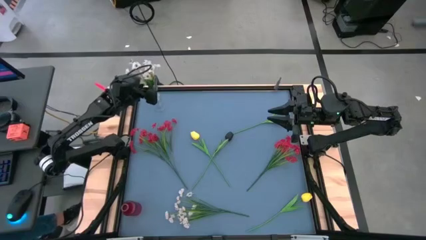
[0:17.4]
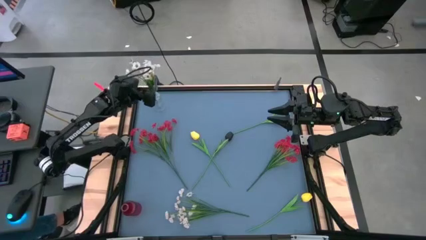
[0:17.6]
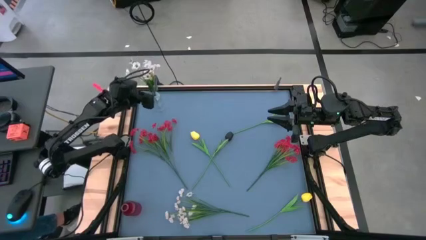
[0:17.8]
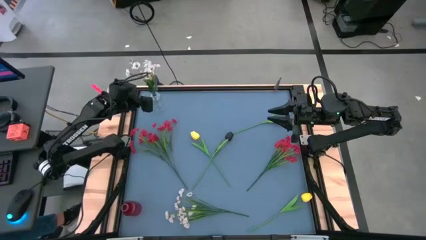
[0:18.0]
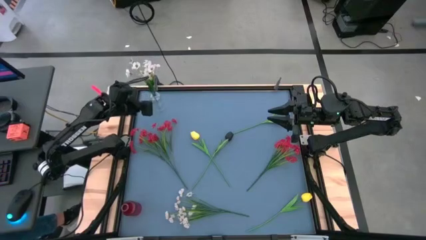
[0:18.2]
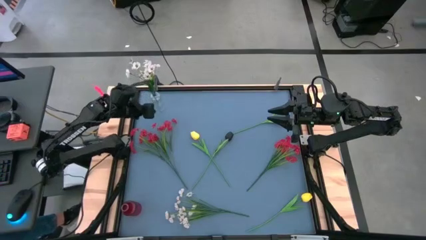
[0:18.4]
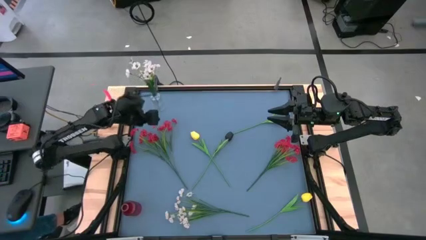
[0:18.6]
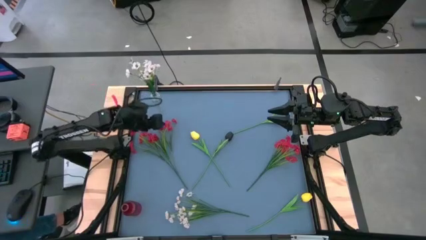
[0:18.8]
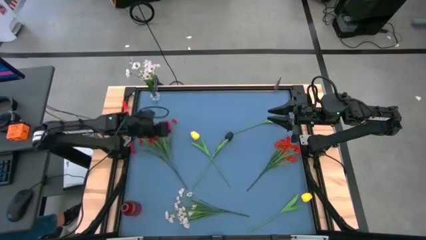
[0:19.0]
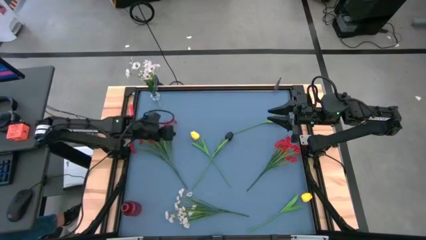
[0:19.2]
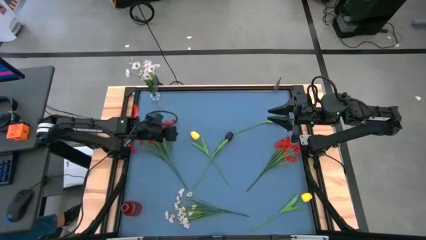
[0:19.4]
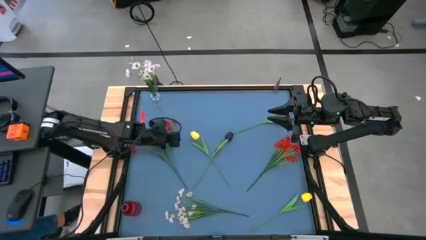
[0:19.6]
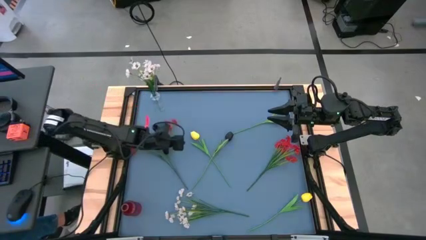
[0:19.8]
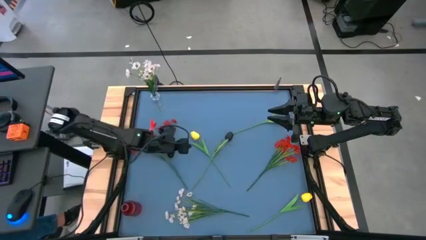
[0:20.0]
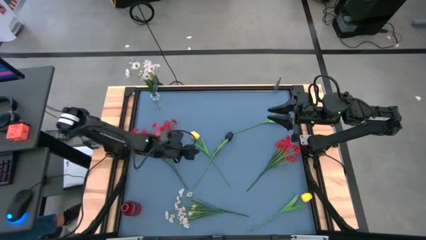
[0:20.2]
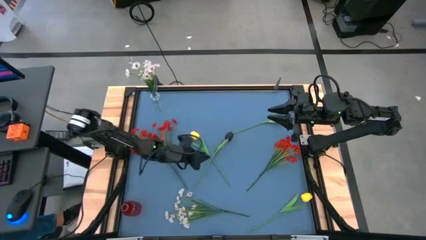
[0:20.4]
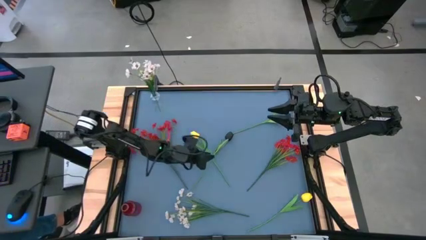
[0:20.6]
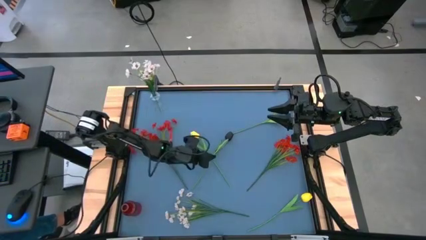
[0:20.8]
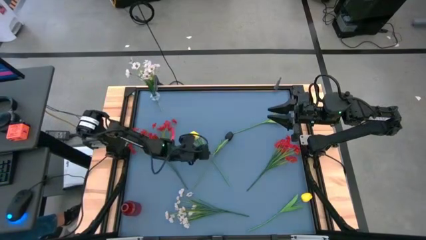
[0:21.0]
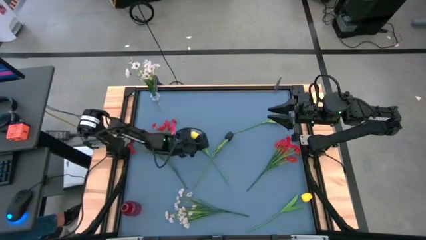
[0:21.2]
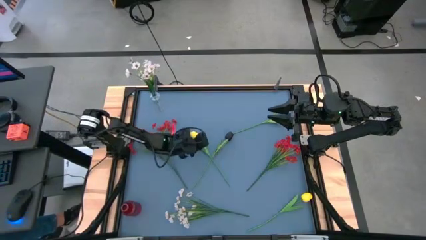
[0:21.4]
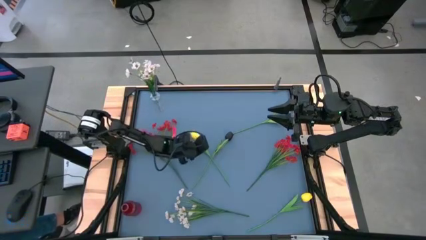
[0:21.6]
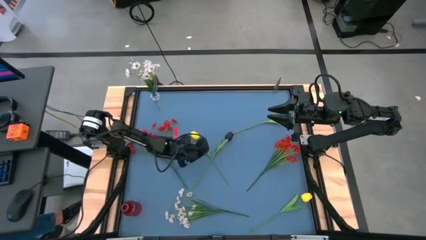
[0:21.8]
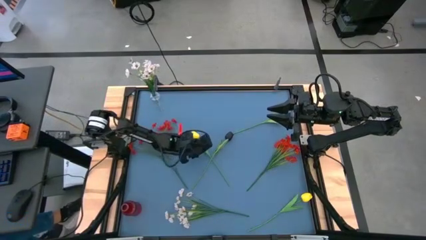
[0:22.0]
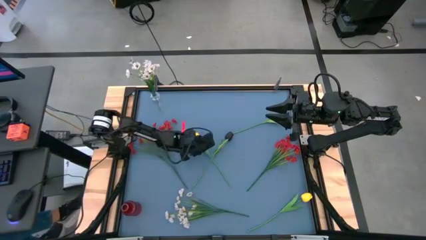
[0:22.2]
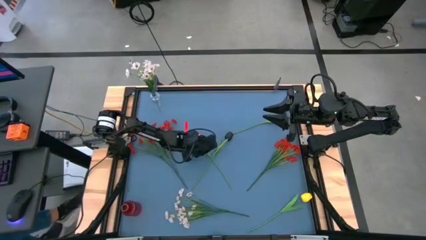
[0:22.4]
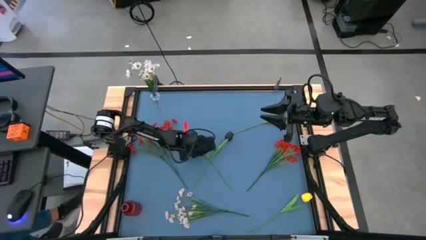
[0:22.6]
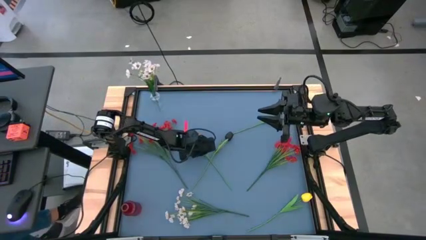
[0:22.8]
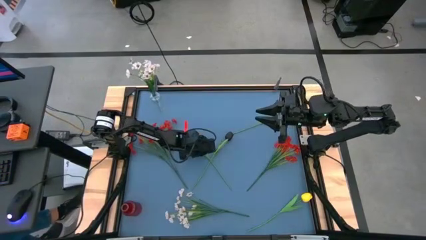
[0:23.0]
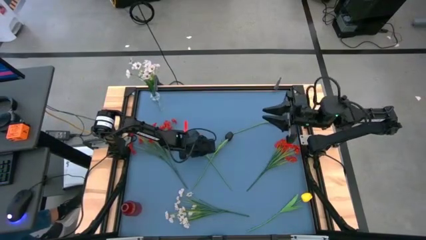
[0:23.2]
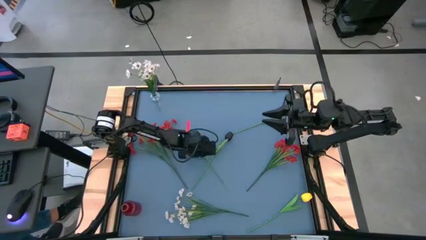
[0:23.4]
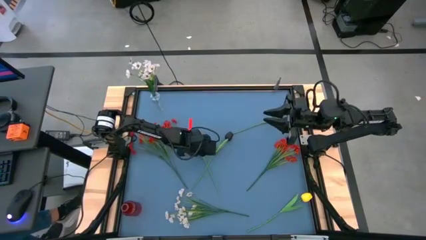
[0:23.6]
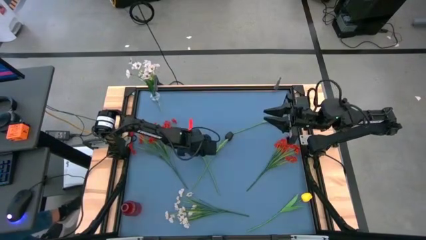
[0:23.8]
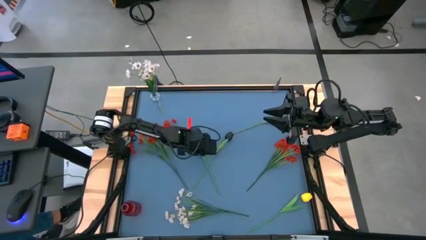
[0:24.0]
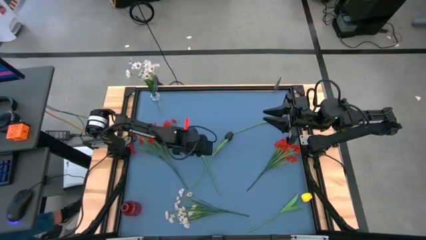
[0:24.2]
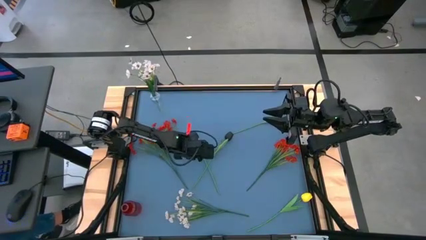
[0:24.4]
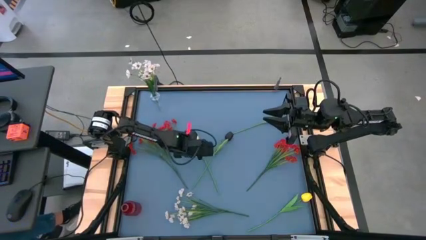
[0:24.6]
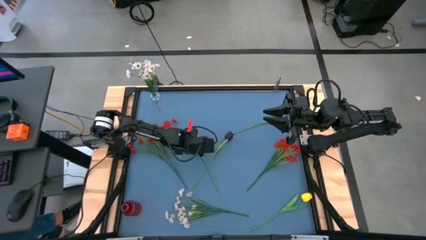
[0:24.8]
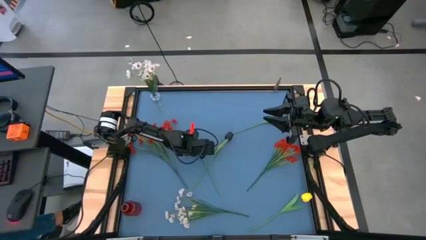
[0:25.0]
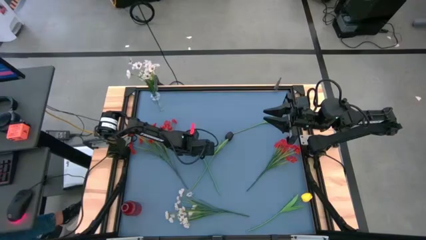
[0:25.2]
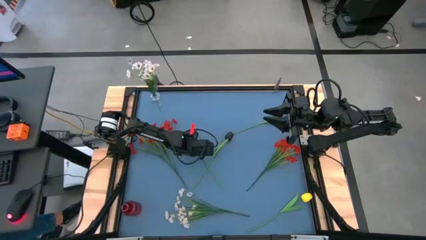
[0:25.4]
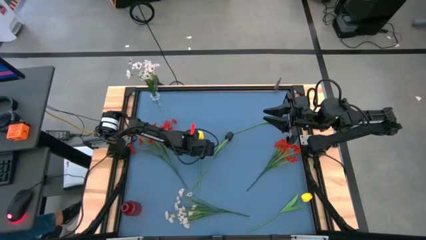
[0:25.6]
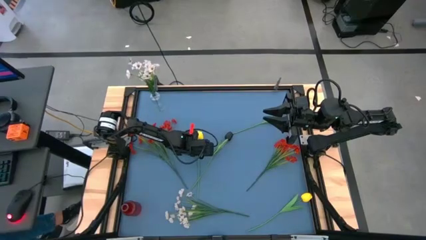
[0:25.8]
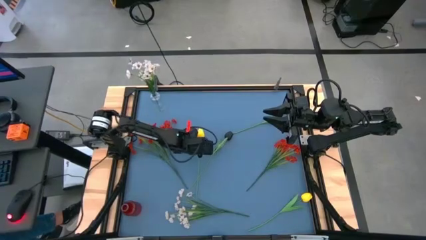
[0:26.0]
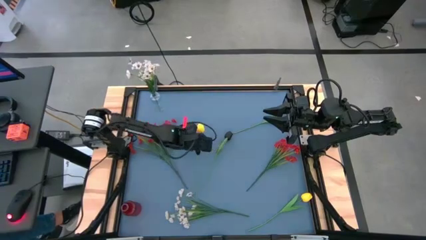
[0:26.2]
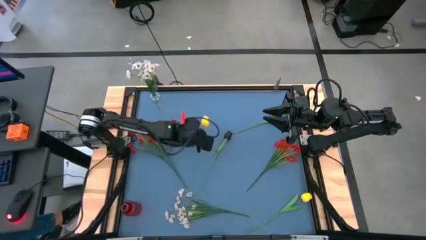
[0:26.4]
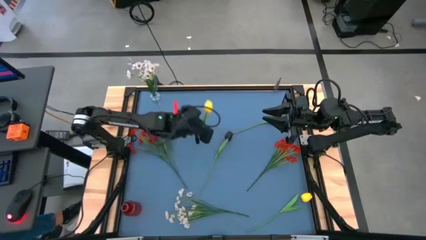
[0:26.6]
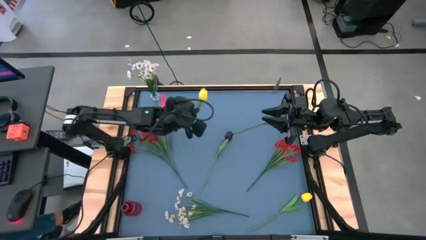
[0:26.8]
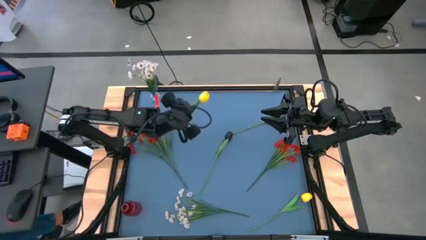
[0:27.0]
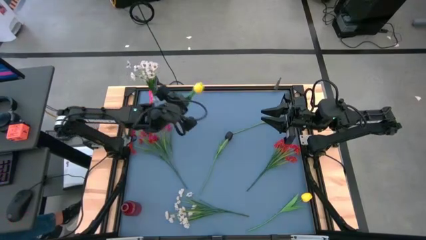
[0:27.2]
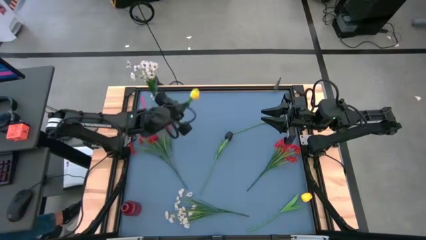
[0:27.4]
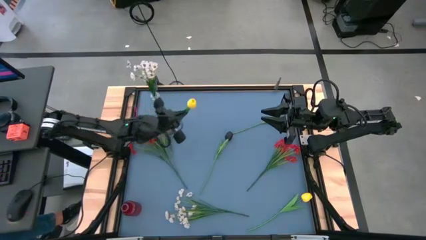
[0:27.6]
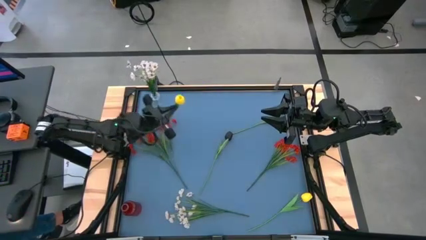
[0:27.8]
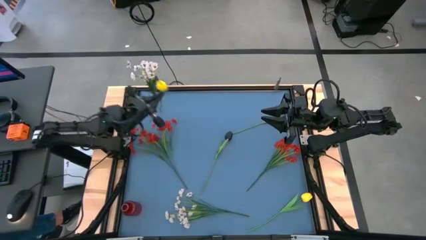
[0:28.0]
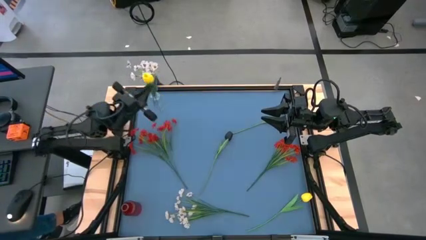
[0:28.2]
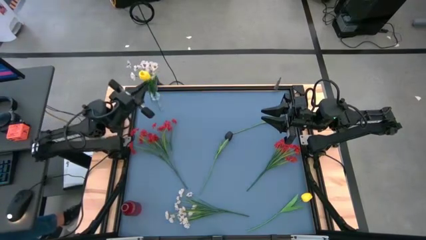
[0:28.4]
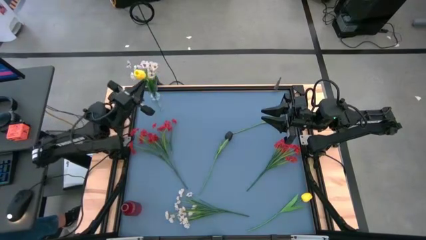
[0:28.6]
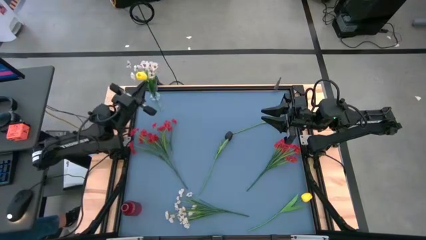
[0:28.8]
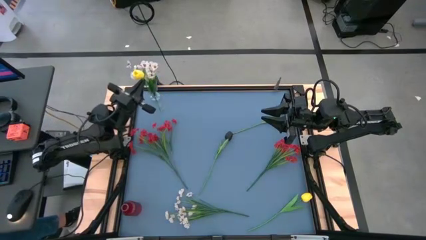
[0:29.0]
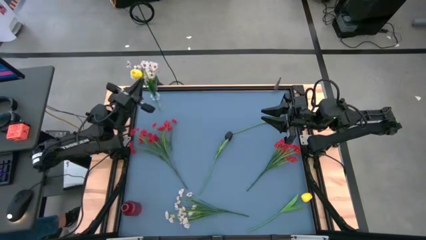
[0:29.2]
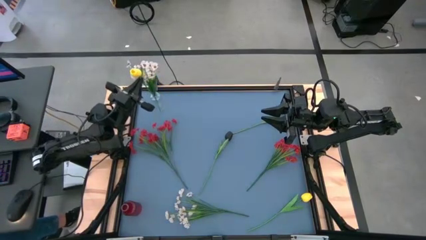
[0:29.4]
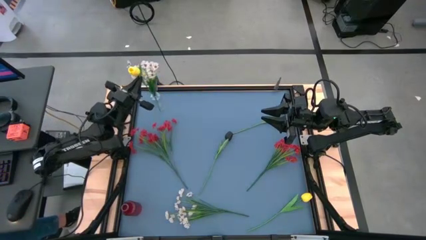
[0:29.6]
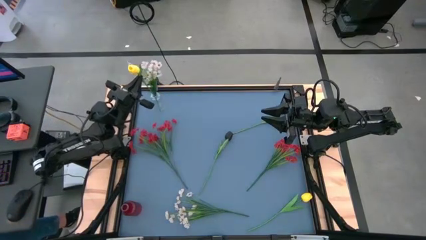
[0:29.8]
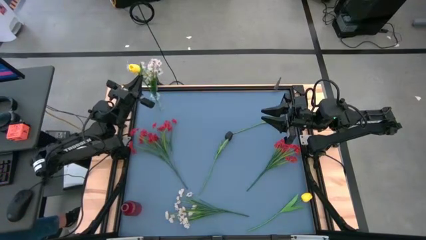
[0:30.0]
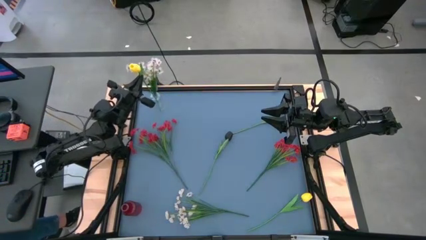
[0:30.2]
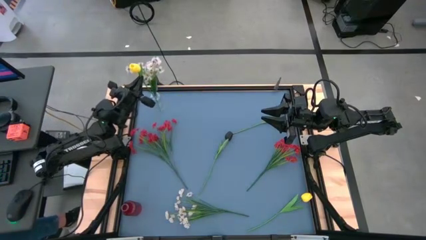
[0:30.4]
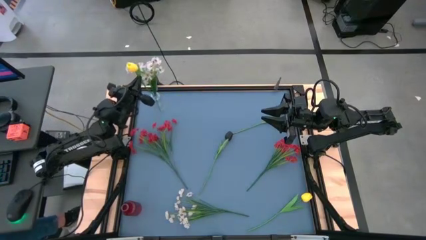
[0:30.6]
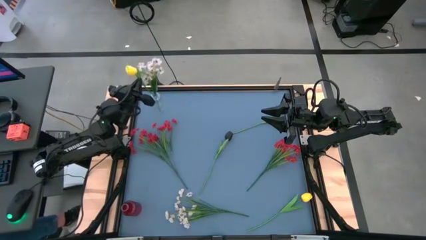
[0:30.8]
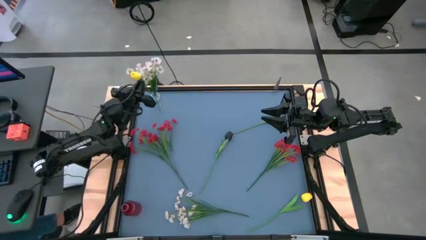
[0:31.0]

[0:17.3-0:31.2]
Task: Sort flowers into vase by color
Put the left yellow flower into the transparent vase
